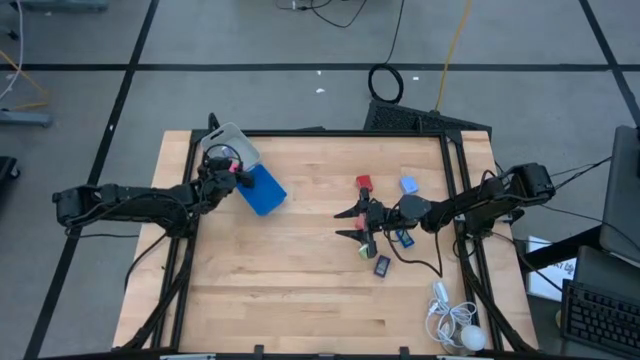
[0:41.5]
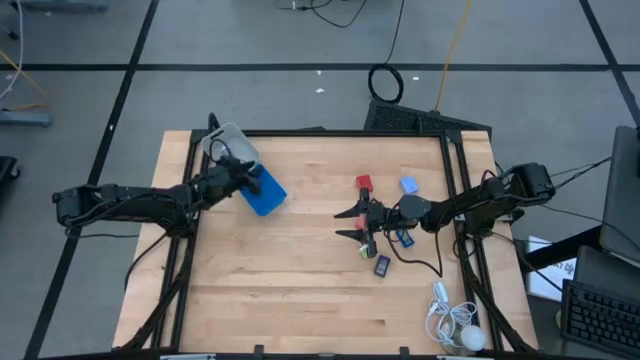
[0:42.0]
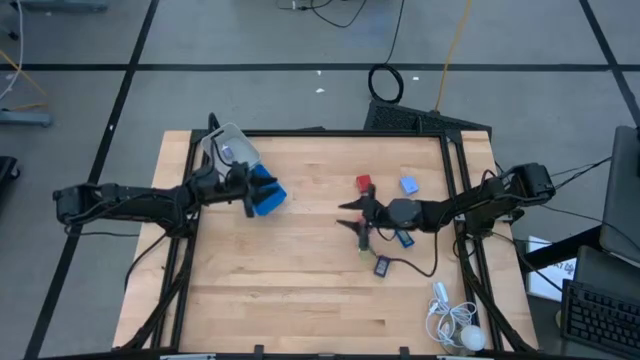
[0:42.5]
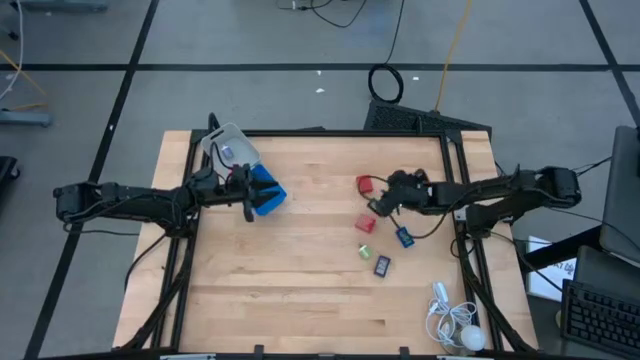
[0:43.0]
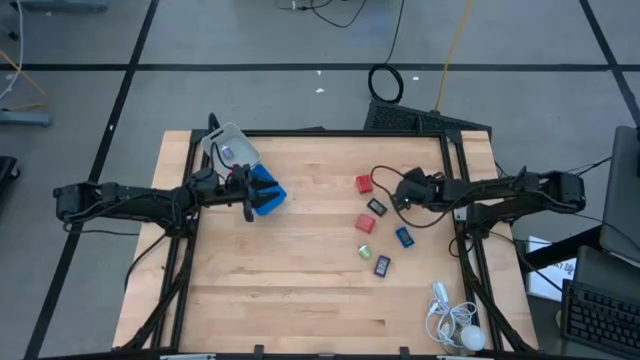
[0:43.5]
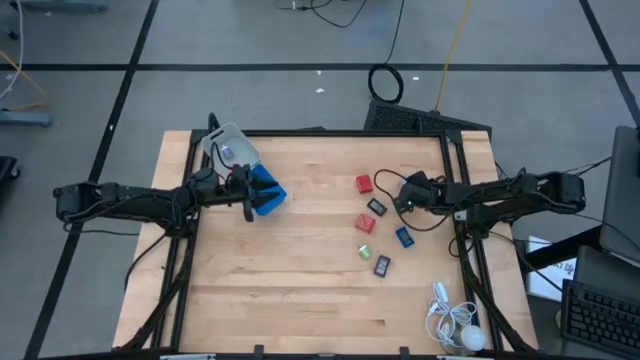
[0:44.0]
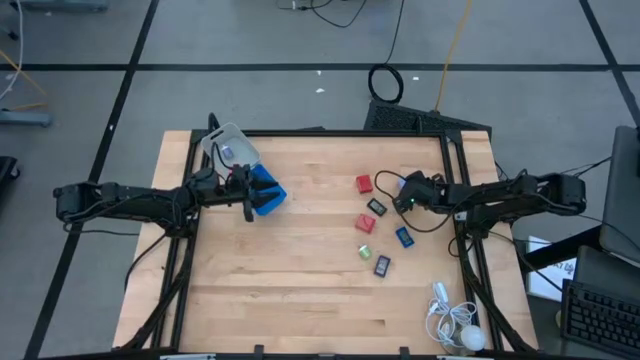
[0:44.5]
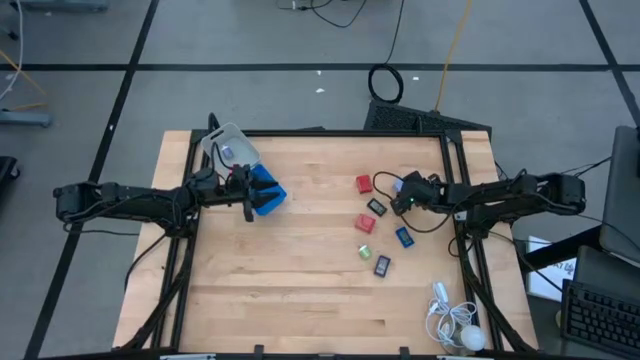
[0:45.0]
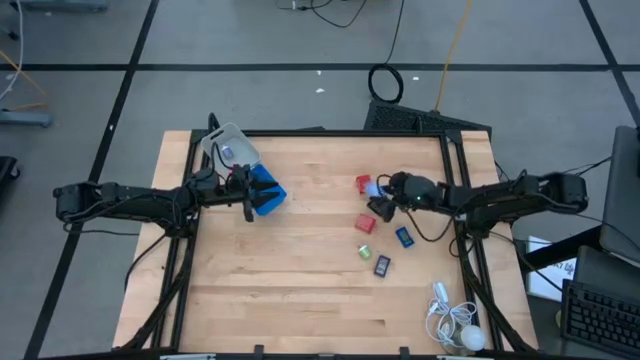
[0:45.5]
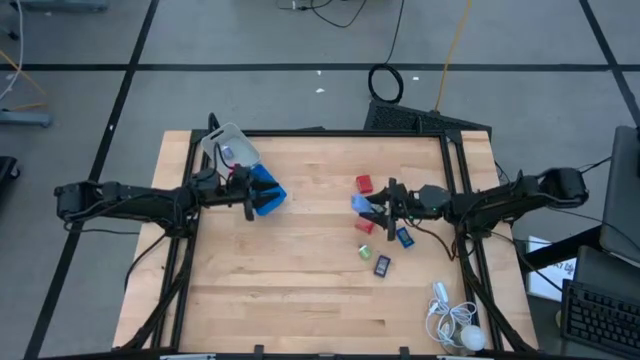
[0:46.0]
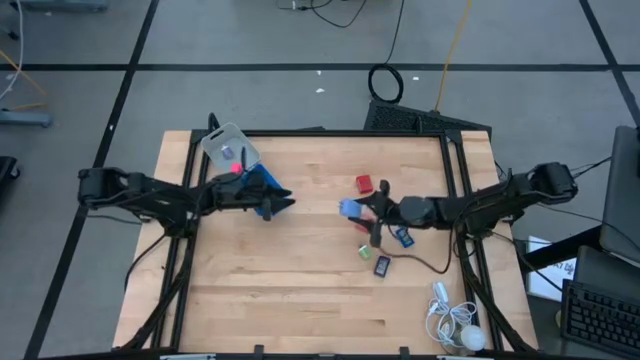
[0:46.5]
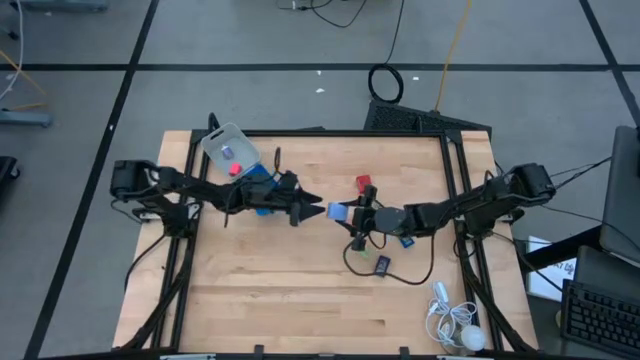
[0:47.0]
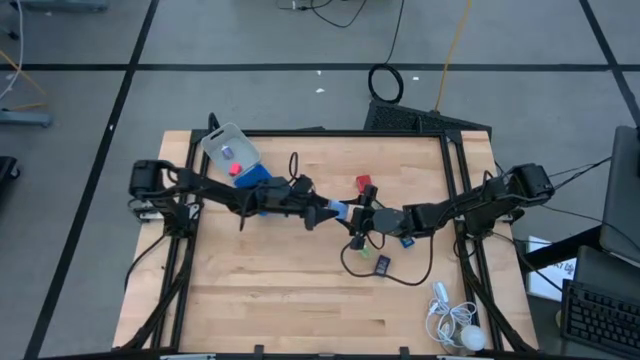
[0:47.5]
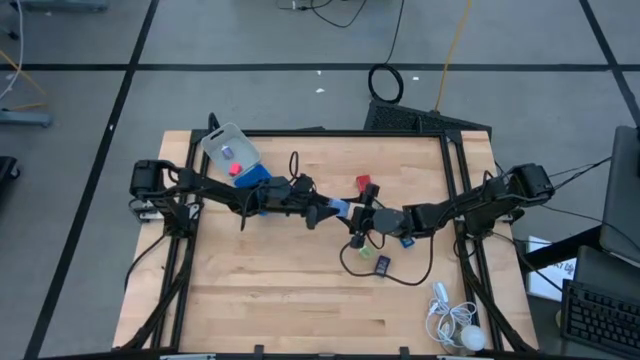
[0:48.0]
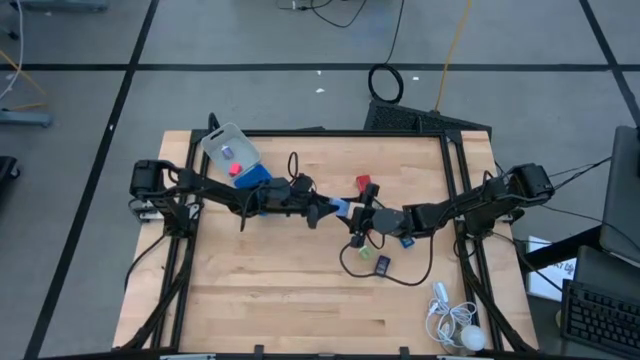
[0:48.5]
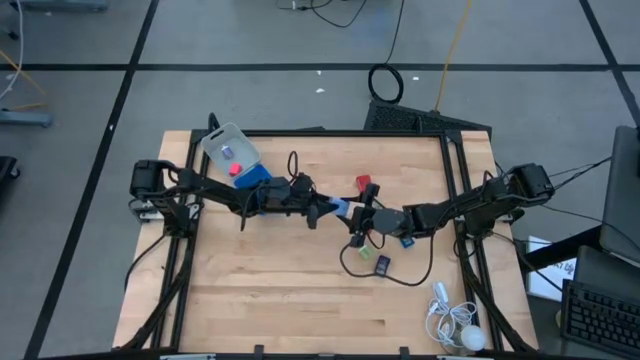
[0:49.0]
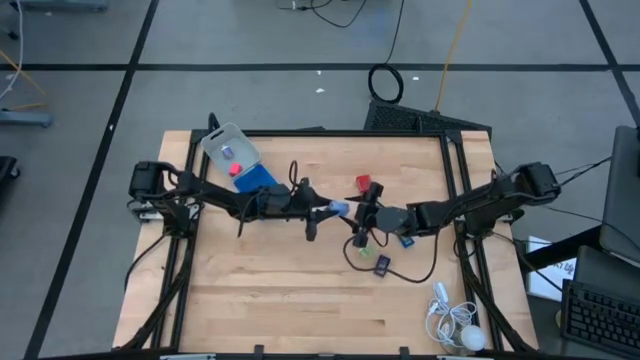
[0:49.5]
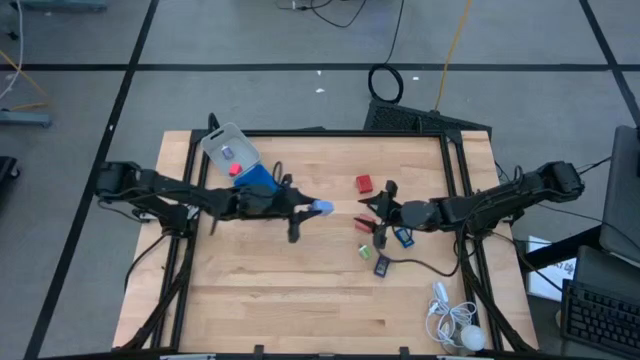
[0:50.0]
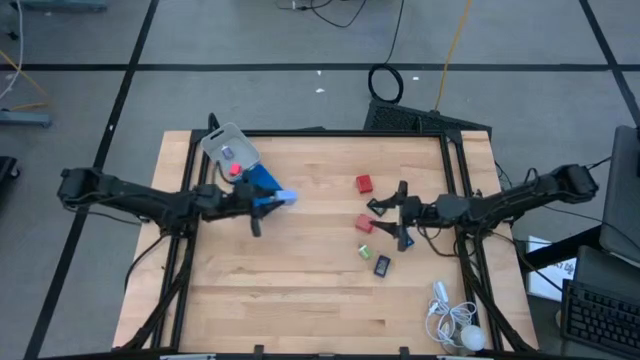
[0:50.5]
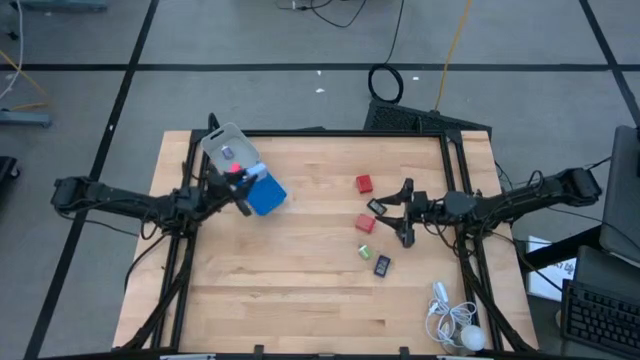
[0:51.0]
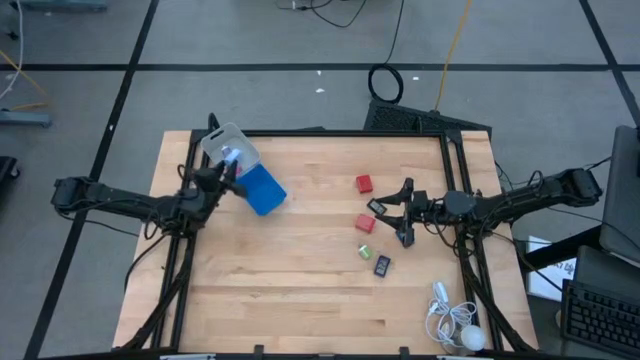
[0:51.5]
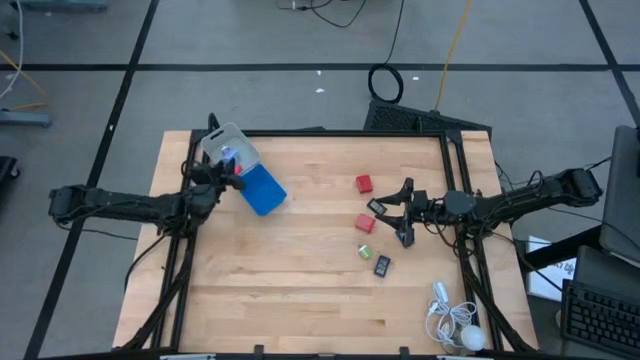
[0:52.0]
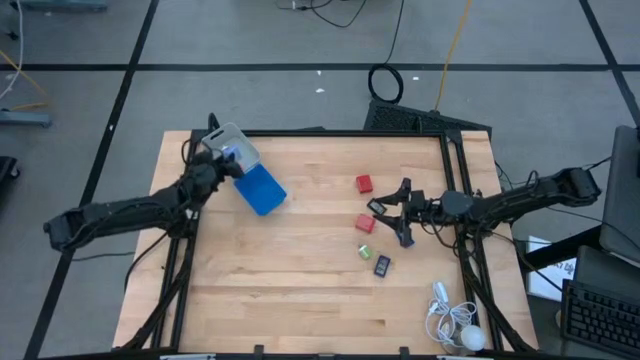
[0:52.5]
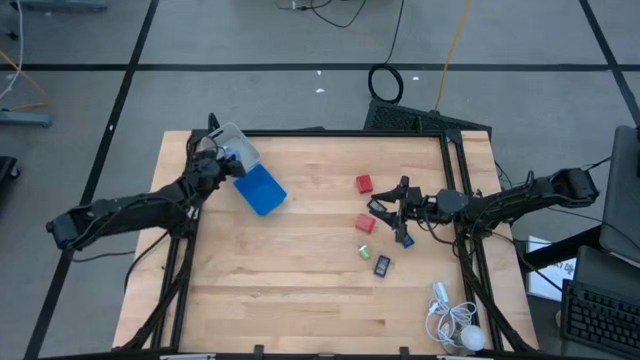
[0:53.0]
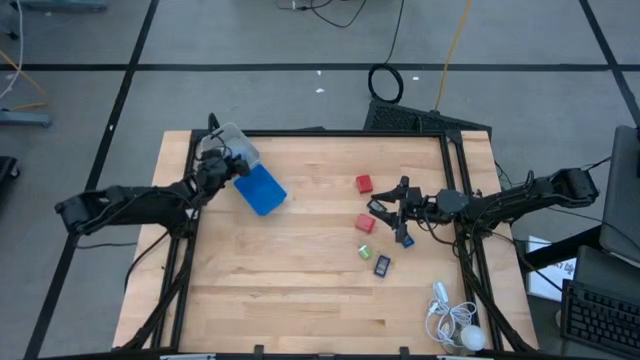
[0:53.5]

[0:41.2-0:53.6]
Task: Pick & Place Office items
Put the light blue charger adapter into the gray bin
